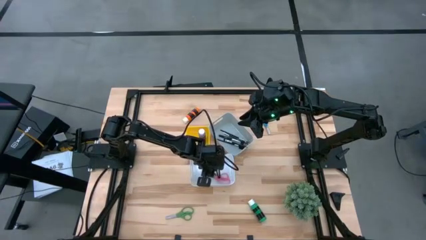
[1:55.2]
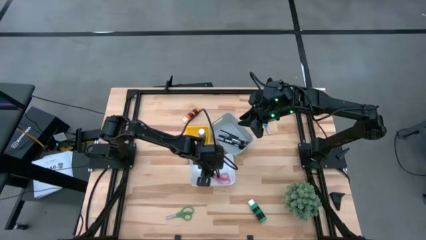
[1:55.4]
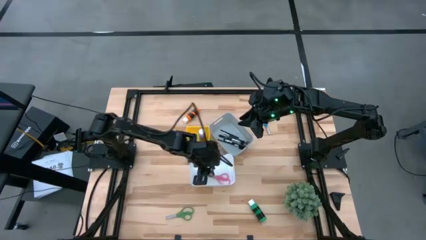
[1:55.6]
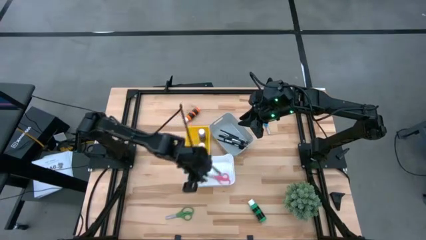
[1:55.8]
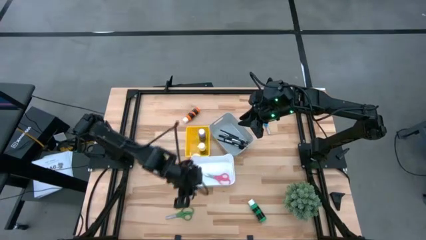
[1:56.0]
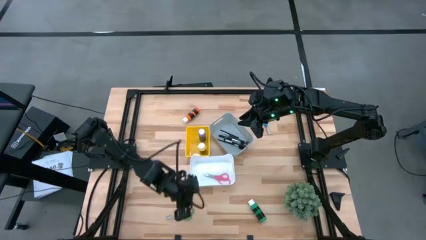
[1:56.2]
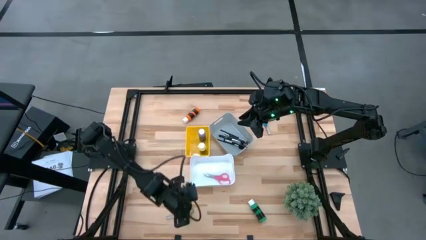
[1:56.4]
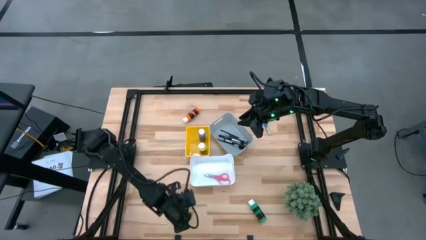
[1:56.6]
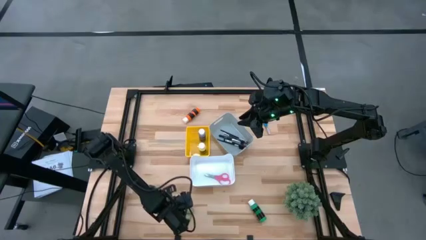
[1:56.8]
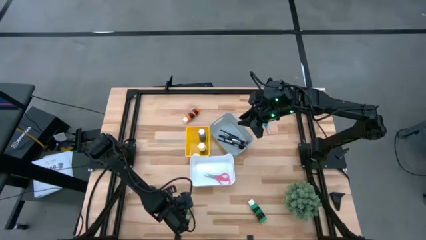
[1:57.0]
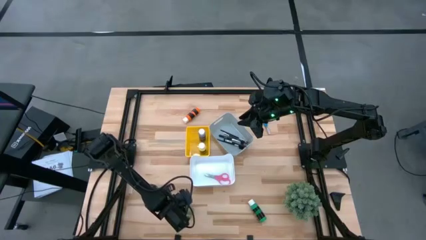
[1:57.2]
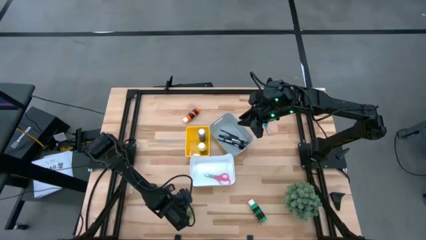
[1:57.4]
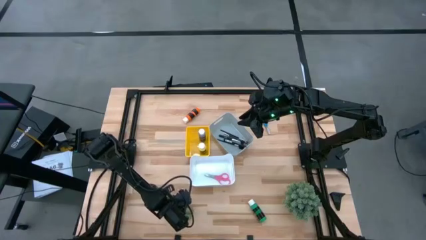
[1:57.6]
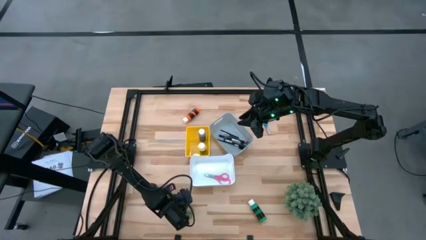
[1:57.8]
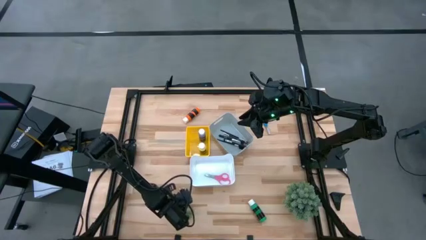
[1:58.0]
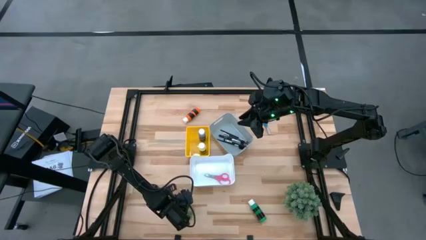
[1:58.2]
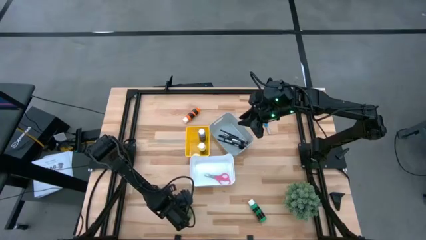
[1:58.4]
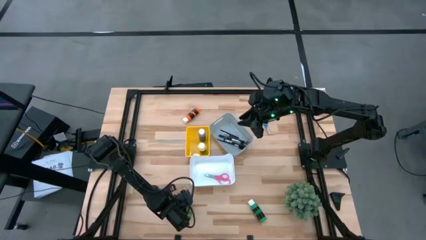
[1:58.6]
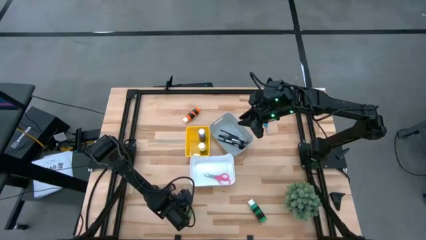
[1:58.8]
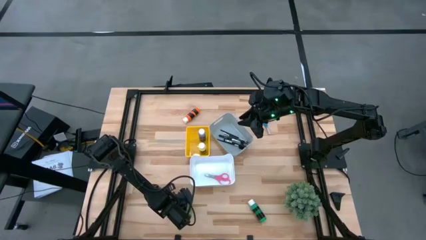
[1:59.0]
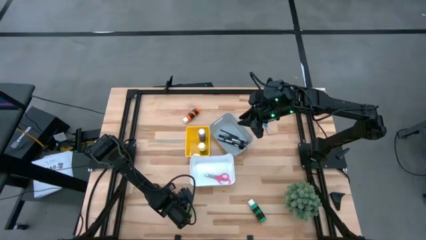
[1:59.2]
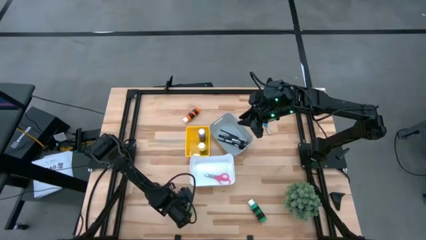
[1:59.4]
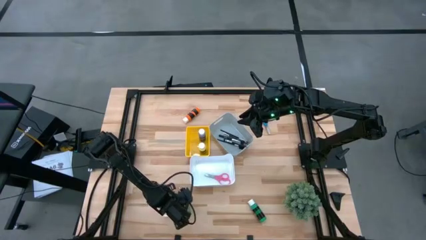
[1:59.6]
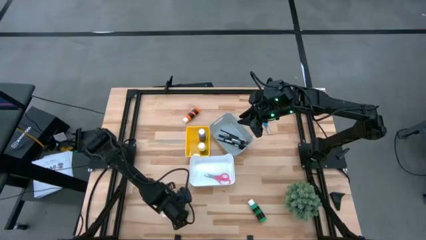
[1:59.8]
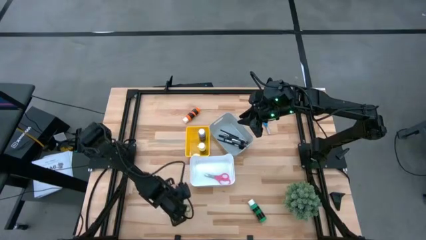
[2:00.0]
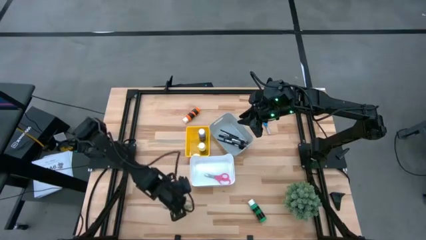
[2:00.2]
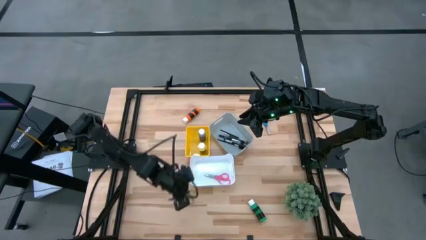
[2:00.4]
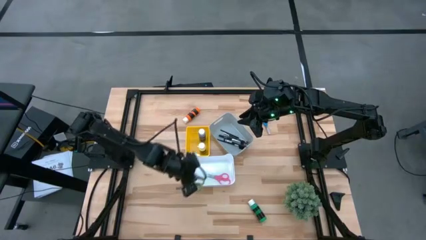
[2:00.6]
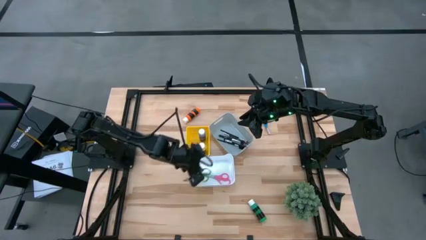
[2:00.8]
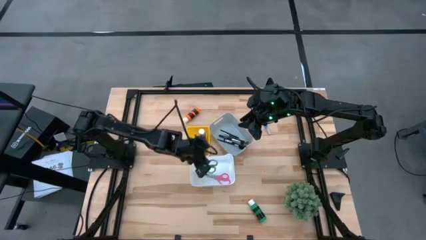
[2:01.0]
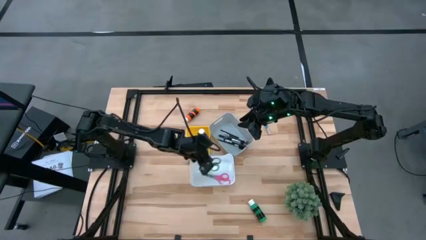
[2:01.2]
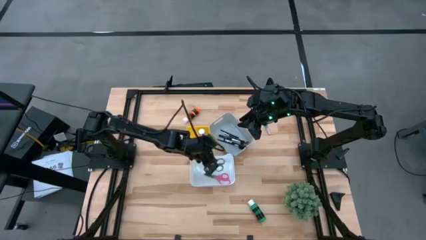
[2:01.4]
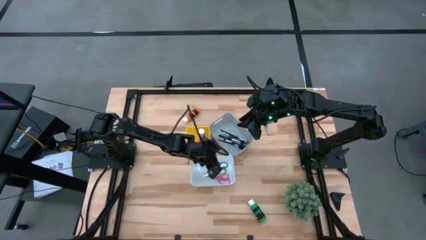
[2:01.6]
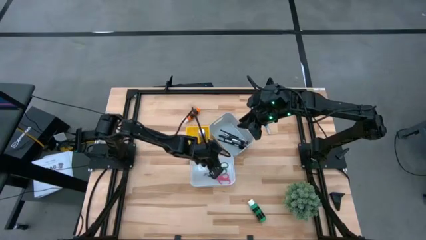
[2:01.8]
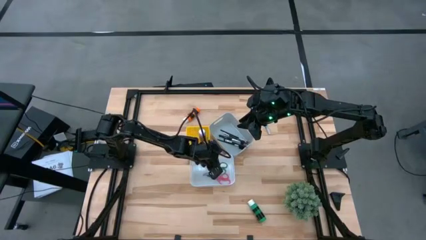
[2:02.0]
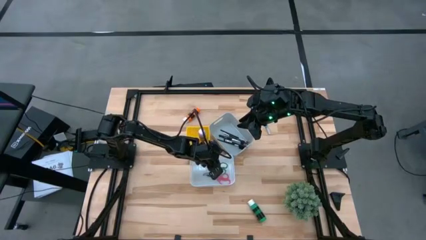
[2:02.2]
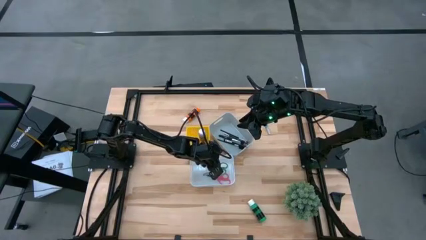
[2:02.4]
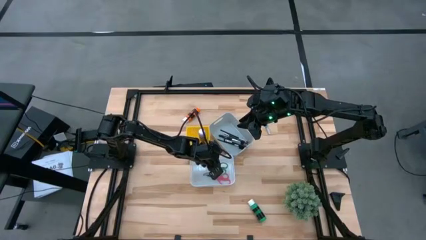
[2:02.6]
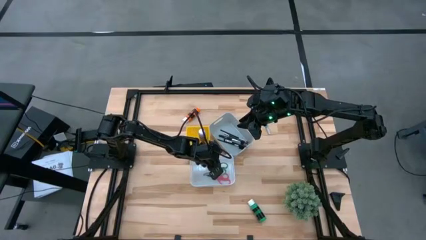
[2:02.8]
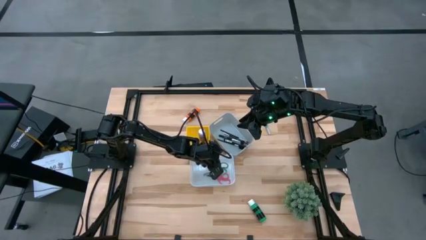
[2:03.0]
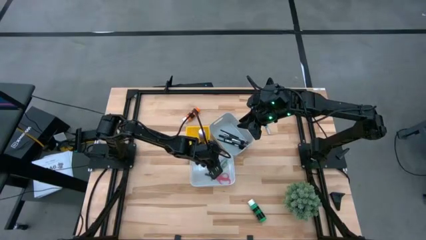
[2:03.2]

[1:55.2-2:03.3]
Task: Pick & Place Paint Supplies
Put the green scissors into the white bin

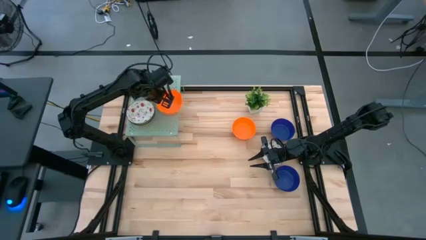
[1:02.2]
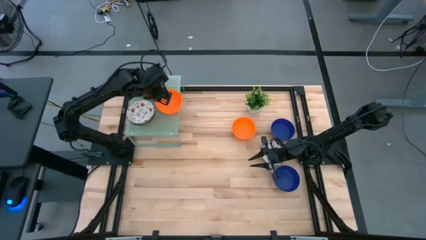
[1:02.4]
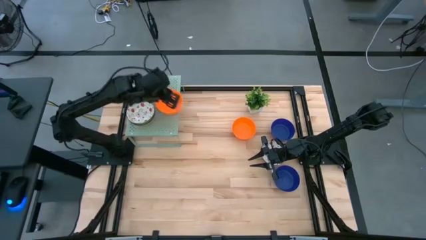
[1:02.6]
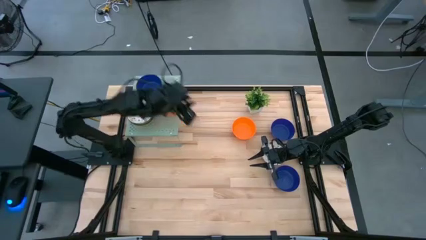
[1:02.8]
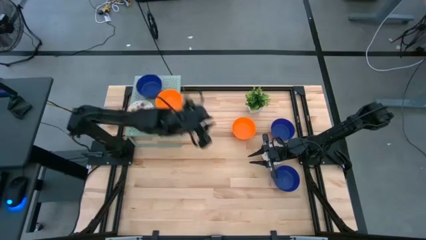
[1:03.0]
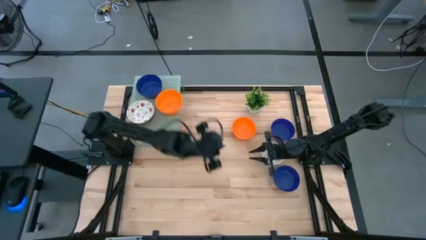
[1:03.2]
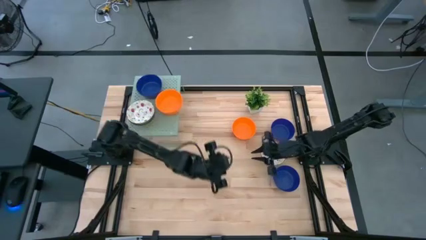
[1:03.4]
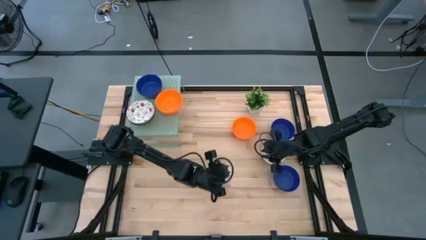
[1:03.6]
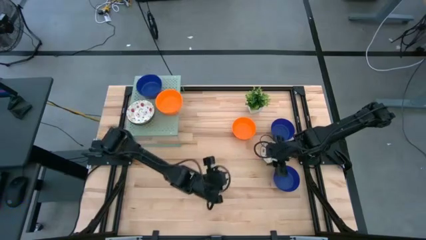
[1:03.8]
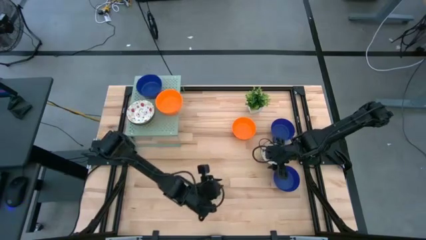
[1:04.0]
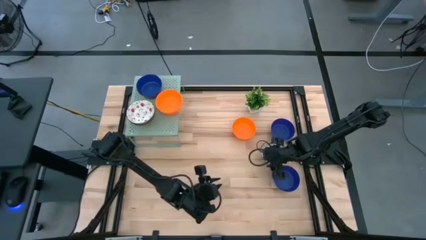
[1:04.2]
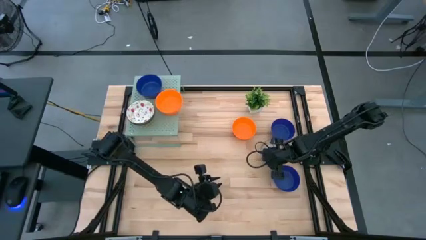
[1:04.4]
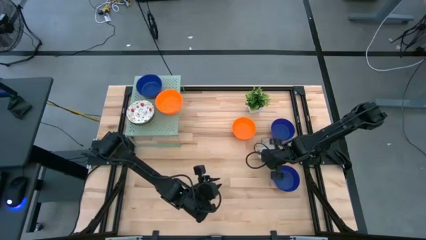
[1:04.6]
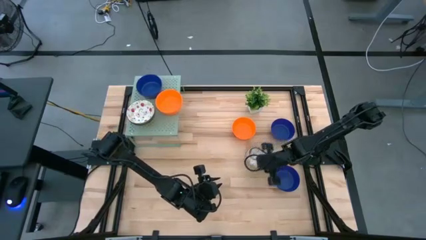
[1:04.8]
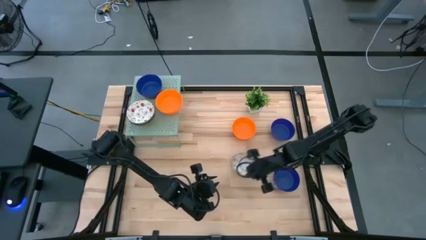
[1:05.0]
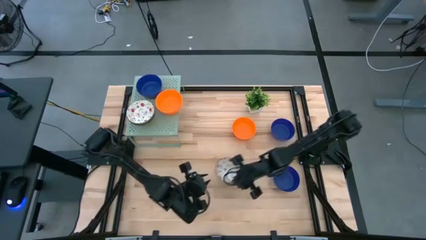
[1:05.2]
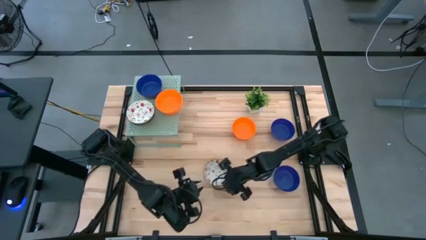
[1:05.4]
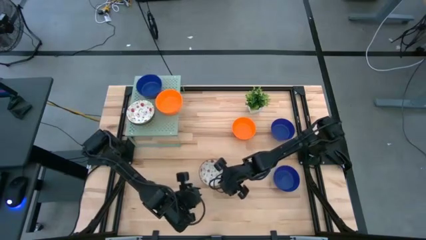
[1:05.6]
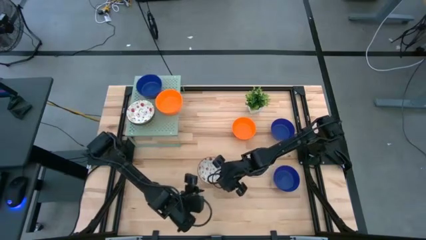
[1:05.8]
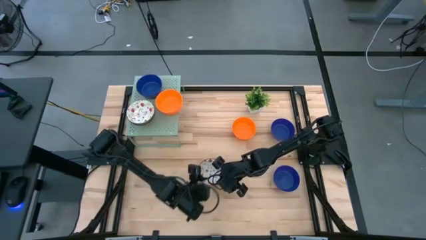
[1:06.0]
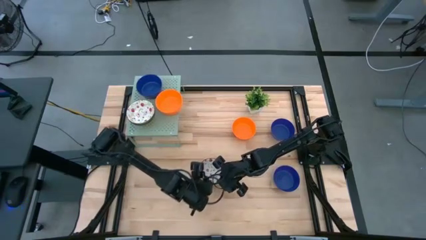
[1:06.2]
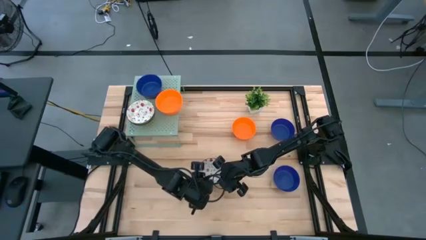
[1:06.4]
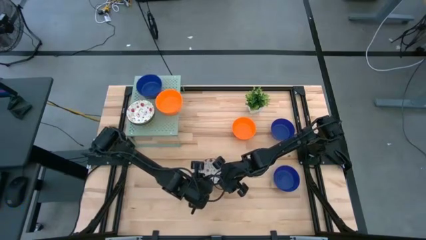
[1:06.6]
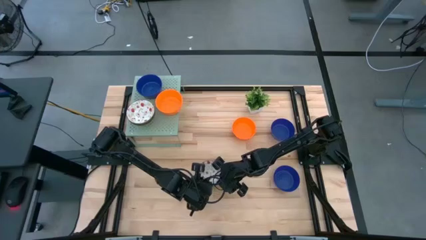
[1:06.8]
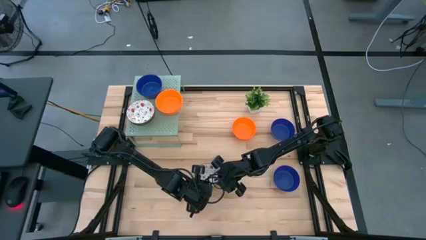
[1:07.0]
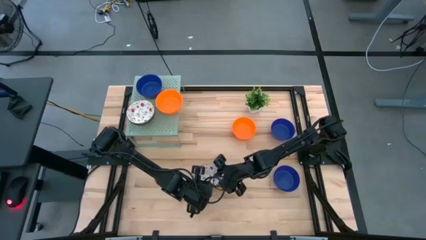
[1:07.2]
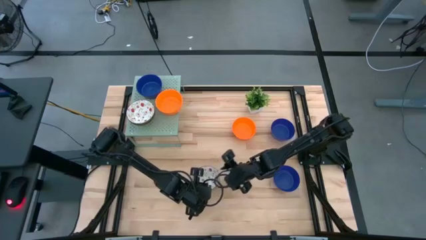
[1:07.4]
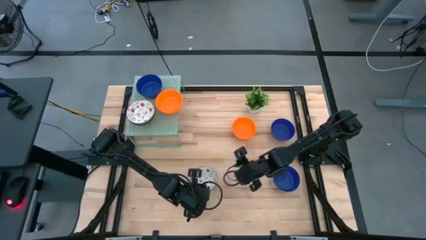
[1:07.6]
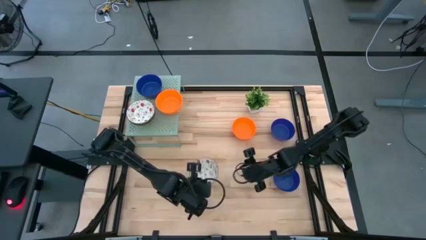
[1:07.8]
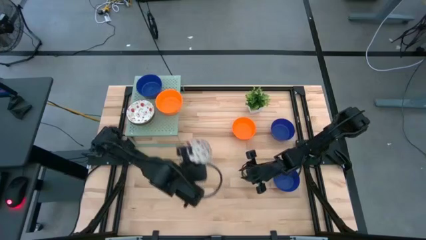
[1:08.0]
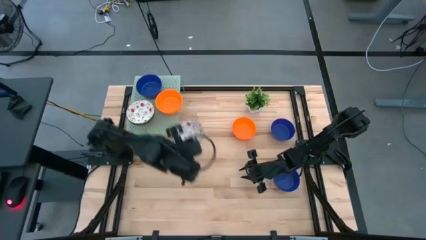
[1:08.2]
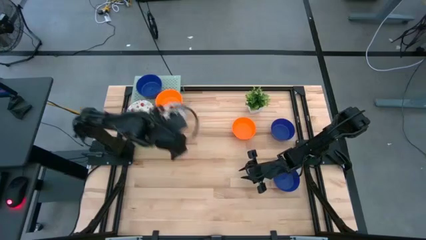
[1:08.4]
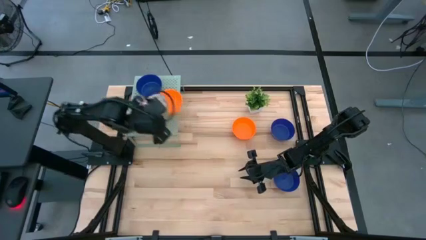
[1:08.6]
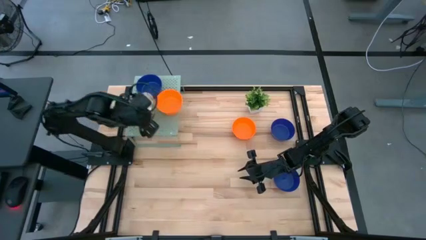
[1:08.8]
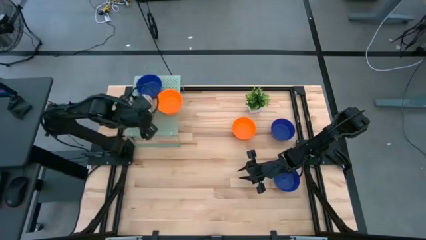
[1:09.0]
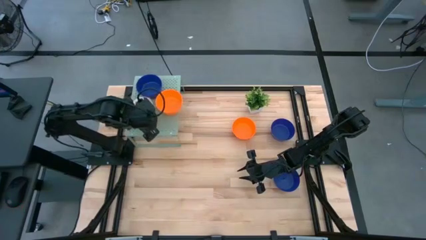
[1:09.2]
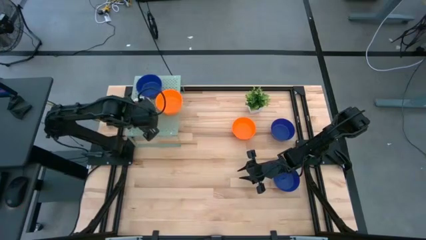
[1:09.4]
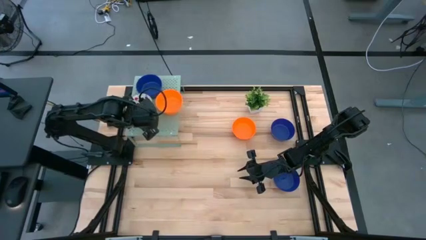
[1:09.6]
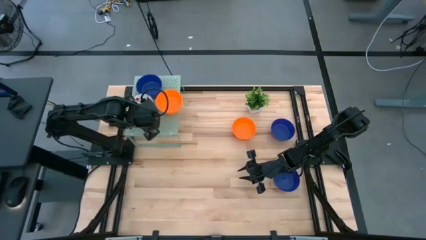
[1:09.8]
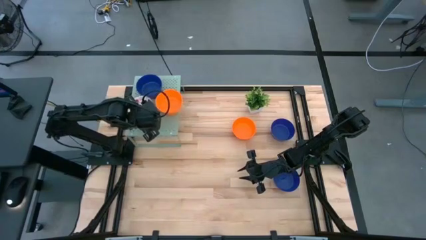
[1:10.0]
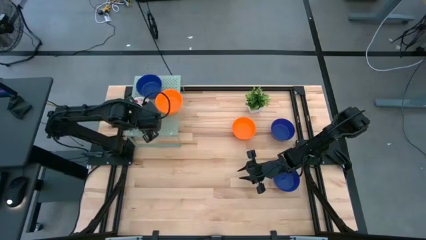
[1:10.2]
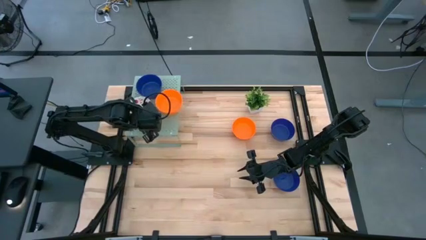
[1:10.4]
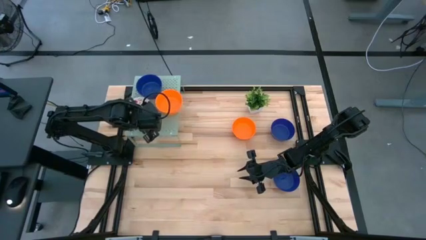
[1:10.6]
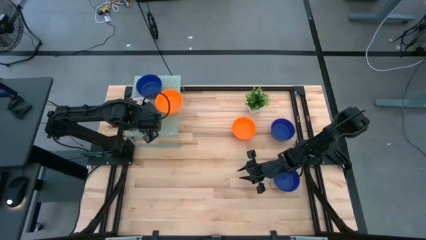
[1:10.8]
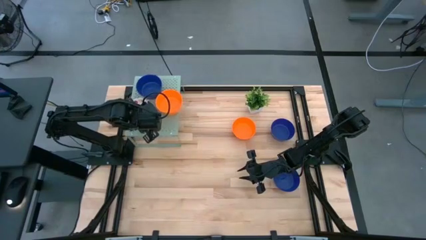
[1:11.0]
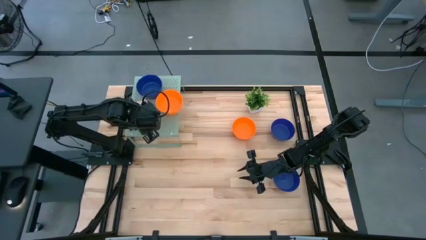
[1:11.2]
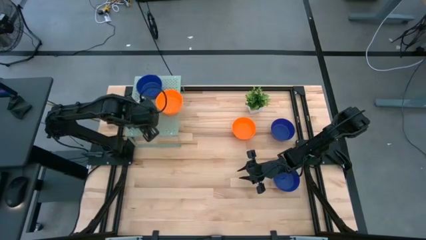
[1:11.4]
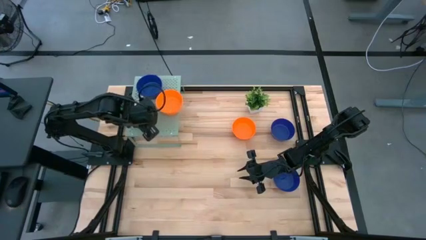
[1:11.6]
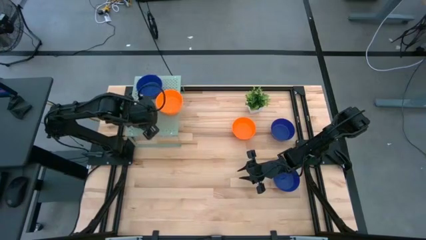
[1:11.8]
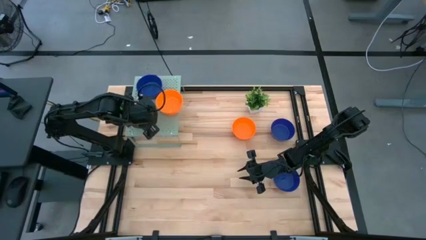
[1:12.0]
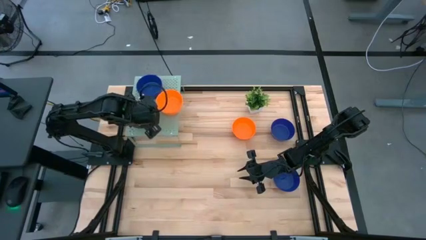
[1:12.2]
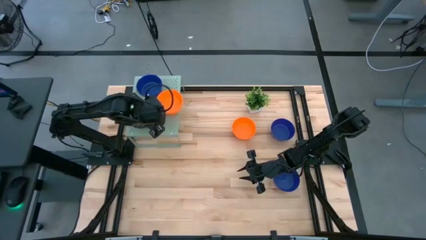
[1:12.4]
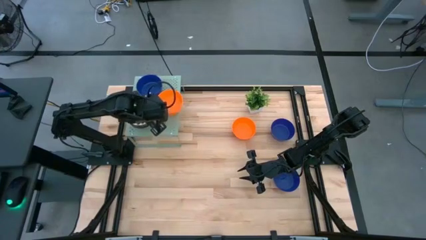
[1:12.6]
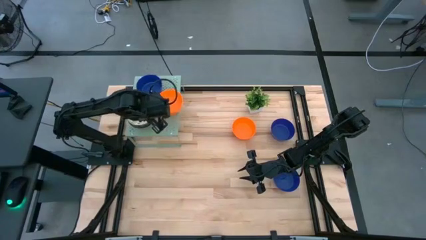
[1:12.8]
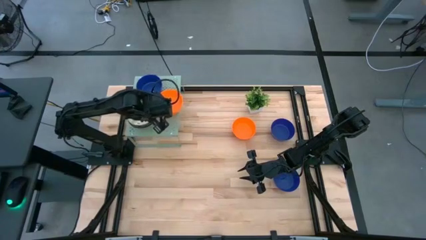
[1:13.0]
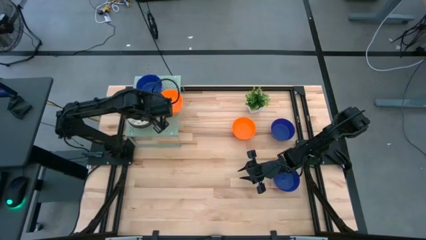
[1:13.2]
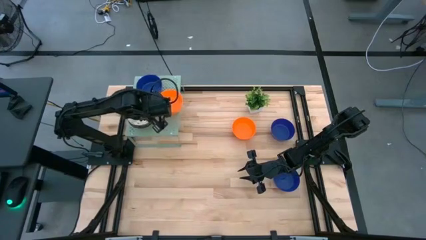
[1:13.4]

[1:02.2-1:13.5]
Task: Pick & Place Mini bowls
Stack the white bowl on the white bowls on the shelf
